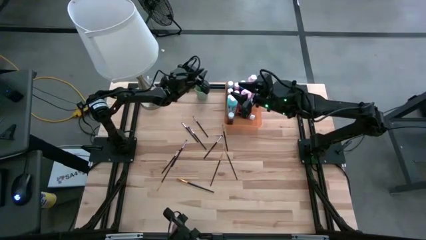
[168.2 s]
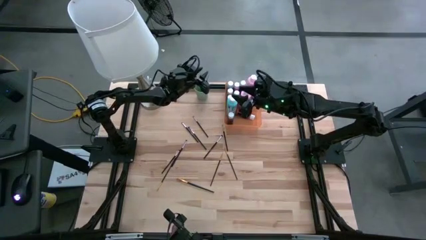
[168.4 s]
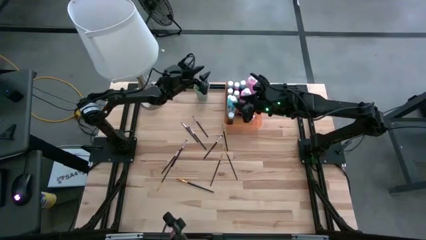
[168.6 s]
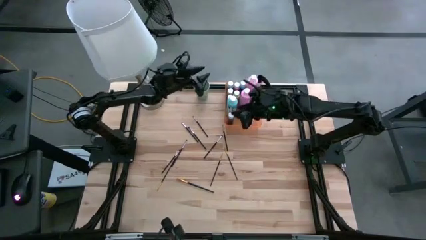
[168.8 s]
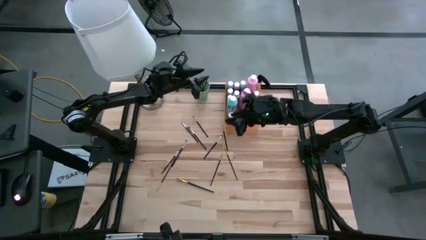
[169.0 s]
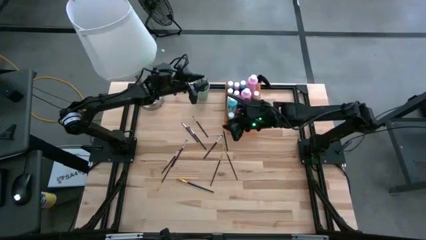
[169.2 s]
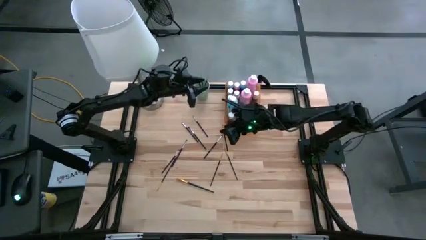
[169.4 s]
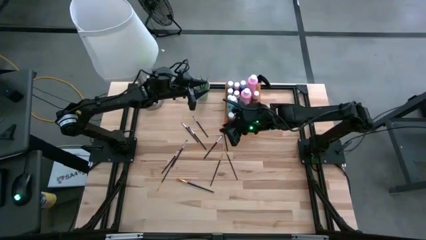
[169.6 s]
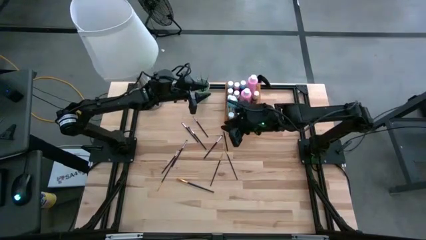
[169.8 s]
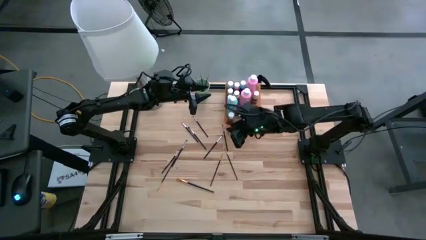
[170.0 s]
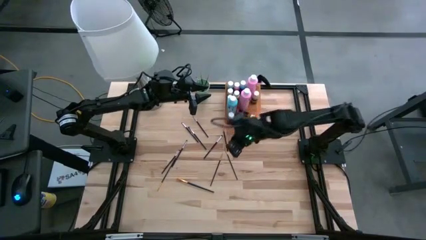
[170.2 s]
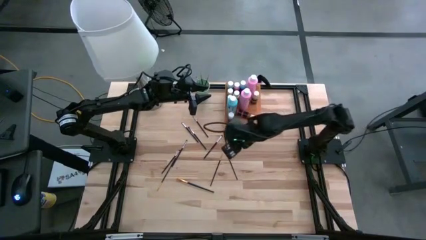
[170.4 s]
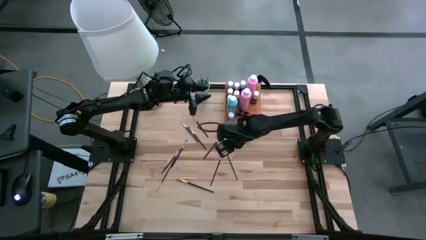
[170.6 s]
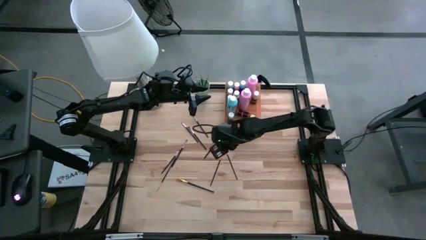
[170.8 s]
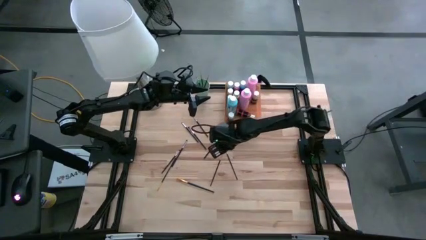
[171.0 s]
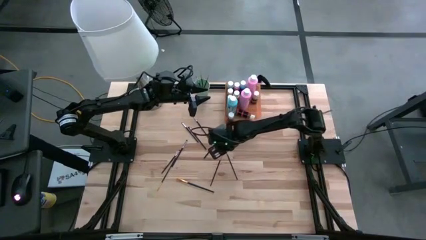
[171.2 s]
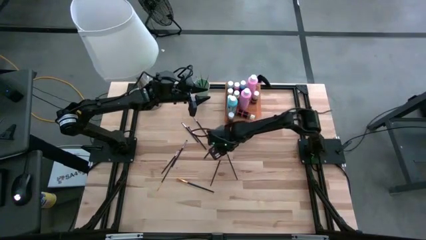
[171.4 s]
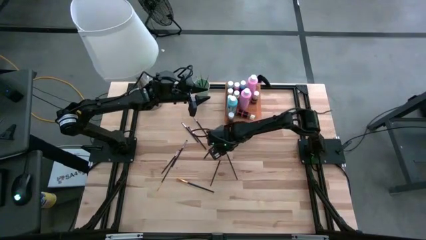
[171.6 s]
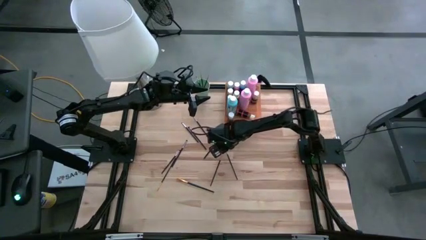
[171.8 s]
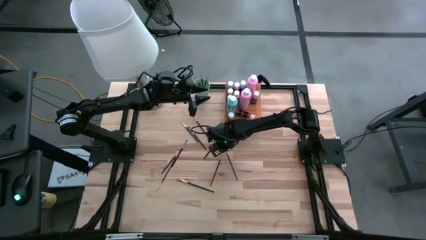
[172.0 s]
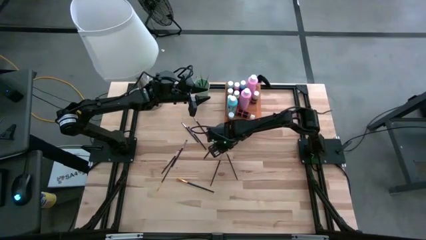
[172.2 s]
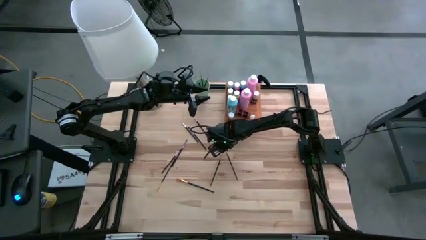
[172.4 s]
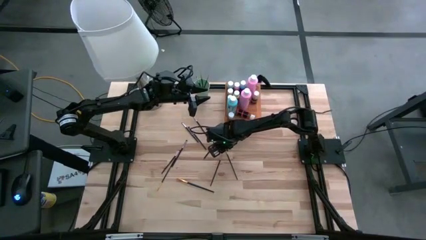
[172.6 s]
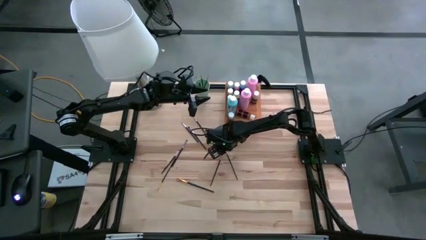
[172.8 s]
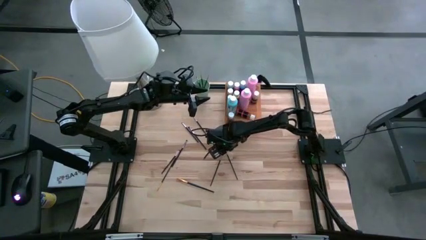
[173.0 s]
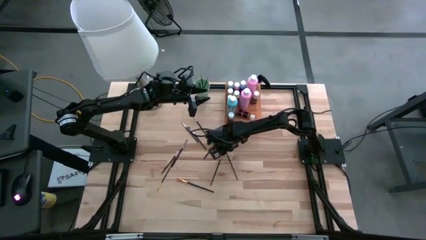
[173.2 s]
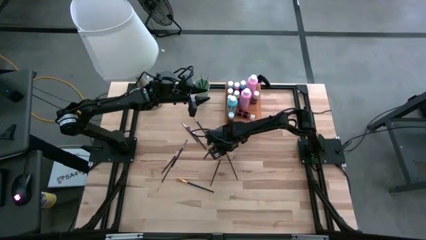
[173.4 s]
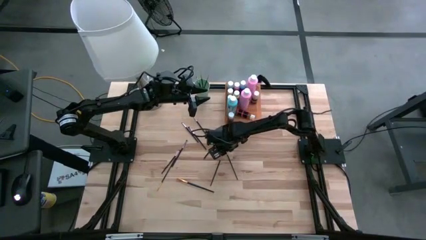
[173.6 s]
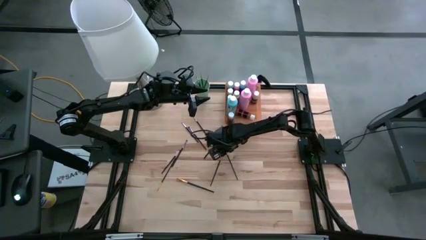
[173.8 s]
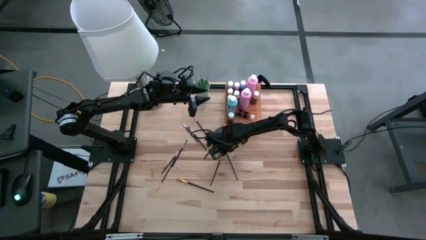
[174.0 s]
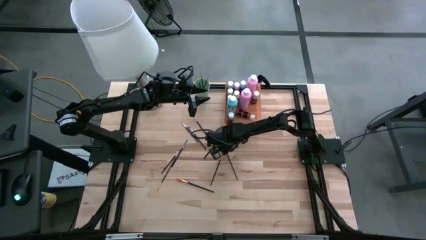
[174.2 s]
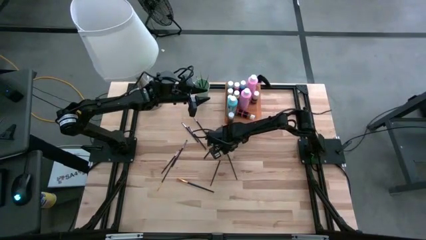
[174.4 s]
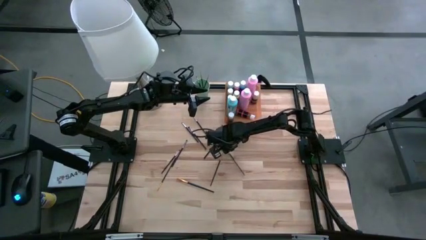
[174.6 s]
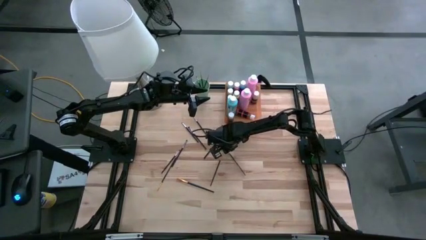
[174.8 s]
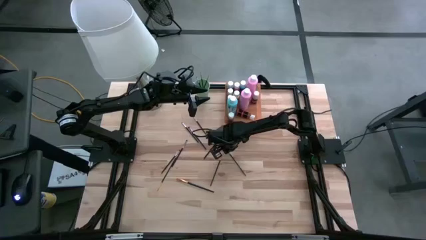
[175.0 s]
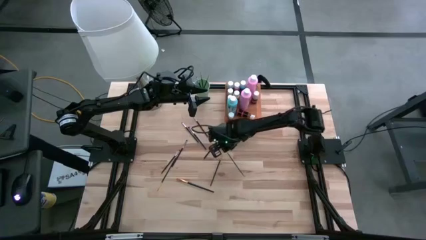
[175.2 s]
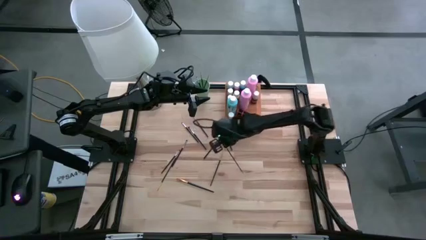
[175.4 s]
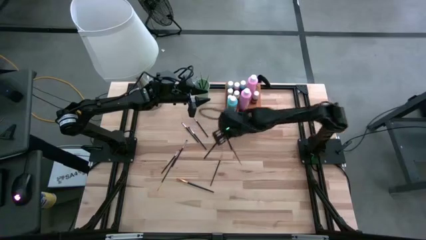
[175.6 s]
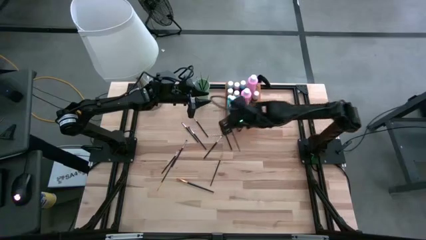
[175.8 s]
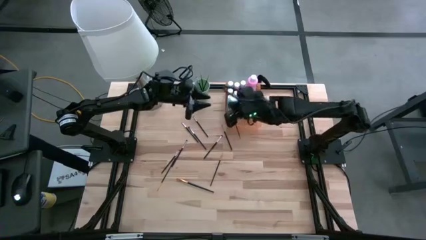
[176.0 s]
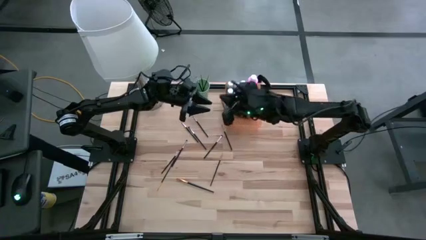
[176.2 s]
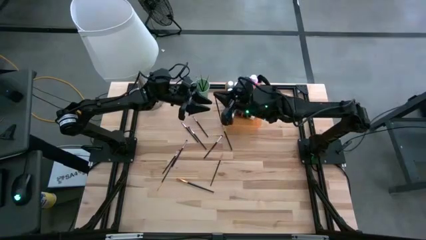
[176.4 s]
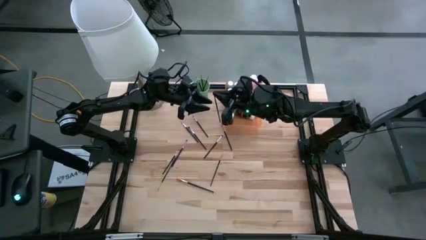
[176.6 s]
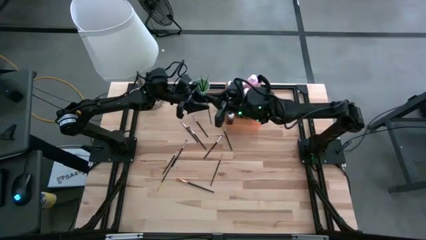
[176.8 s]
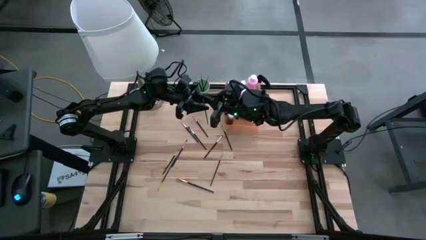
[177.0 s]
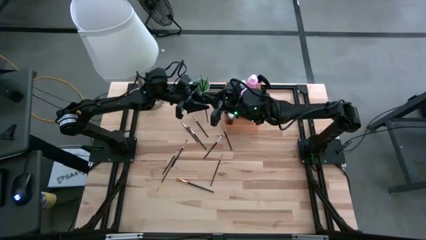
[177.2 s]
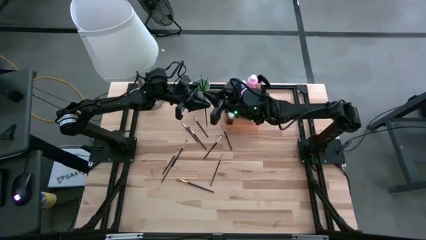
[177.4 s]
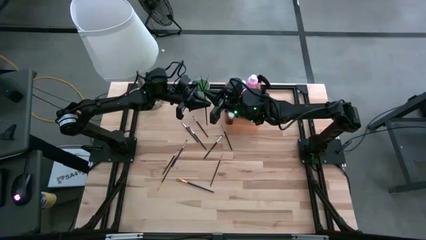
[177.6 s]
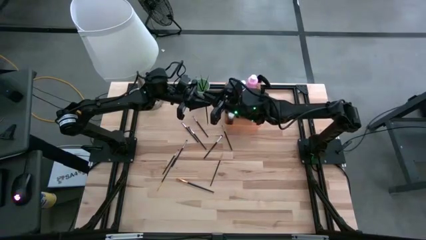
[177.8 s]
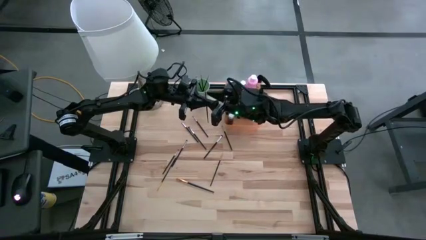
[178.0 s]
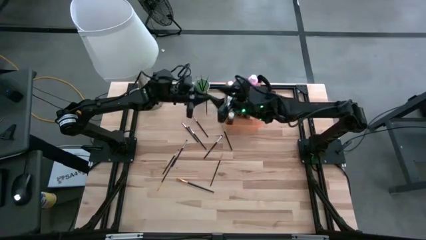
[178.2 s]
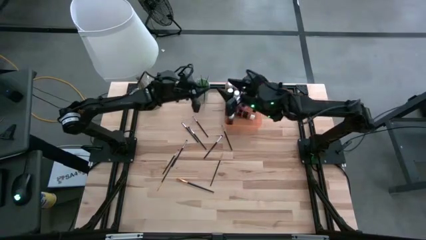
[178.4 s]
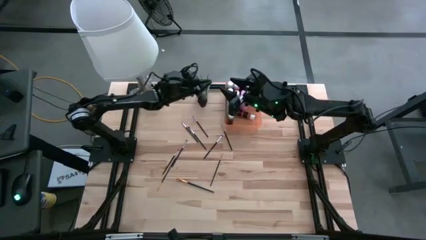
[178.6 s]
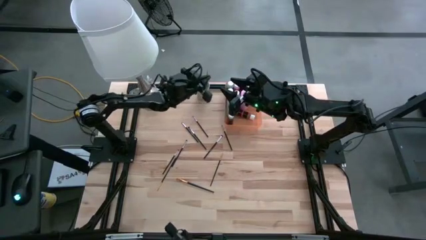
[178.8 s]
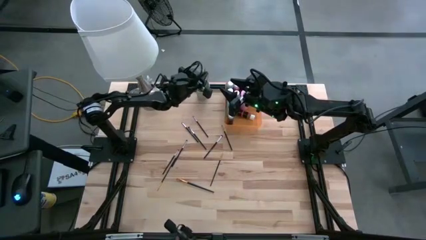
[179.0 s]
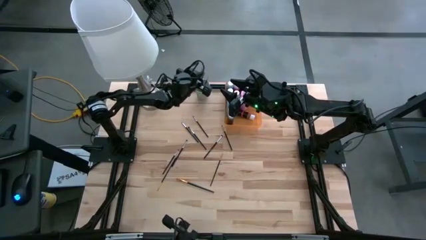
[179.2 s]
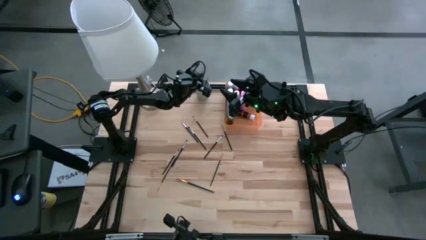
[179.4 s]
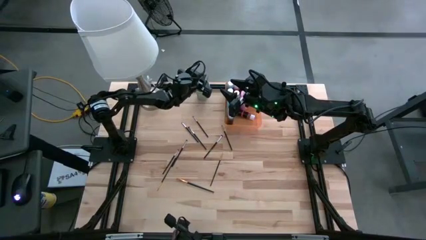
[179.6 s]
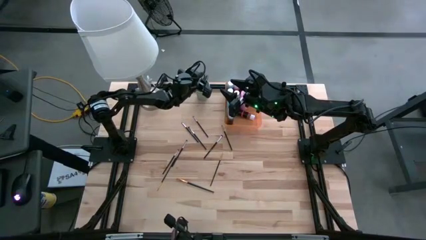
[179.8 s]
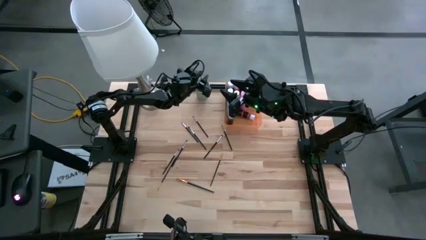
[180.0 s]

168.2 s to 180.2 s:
Task: Pick & Place Paint Supplies
Put the yellow paint brush into the green cup
